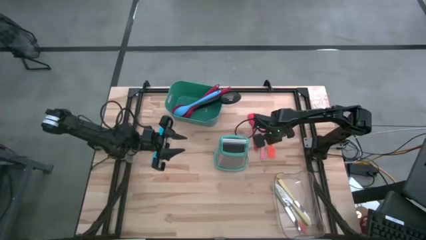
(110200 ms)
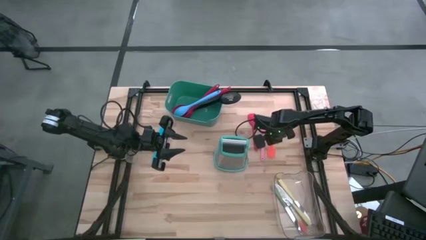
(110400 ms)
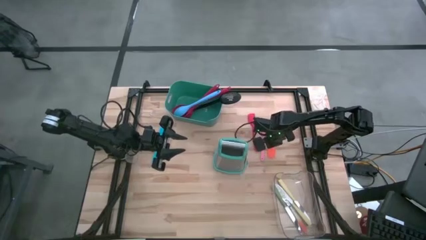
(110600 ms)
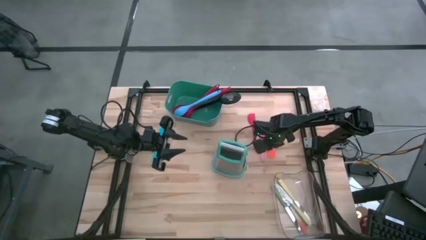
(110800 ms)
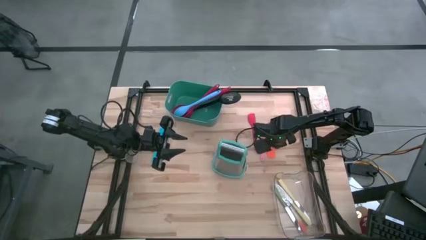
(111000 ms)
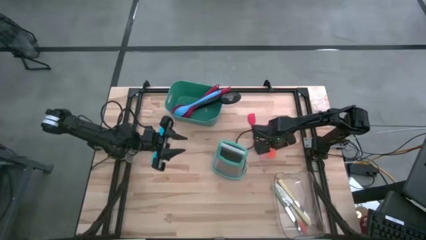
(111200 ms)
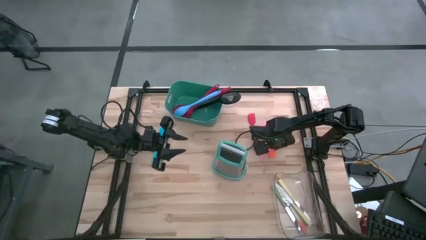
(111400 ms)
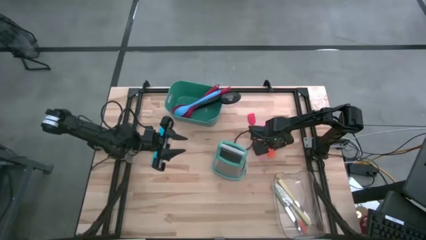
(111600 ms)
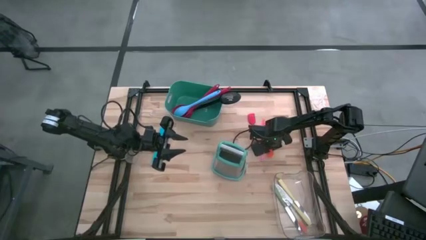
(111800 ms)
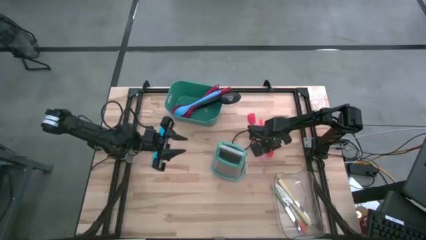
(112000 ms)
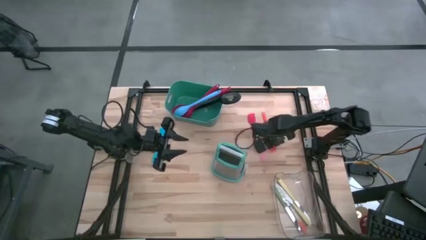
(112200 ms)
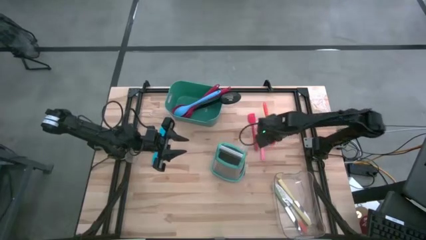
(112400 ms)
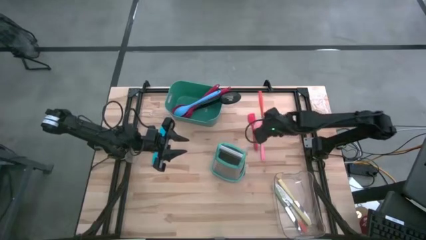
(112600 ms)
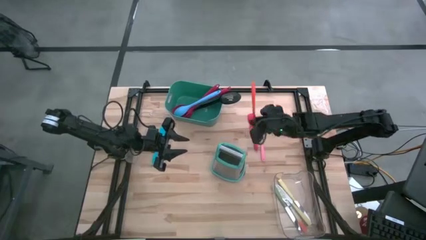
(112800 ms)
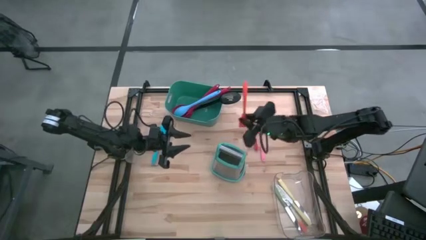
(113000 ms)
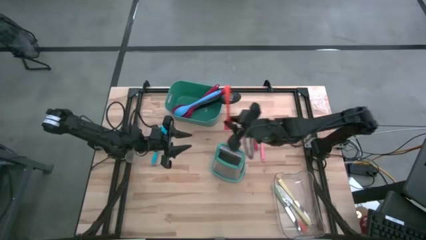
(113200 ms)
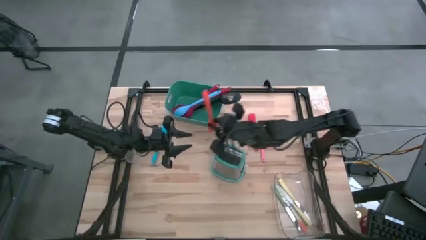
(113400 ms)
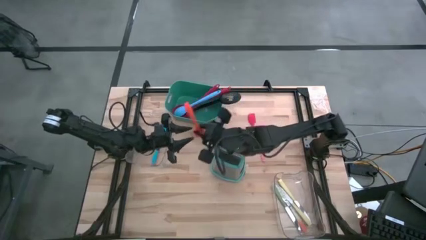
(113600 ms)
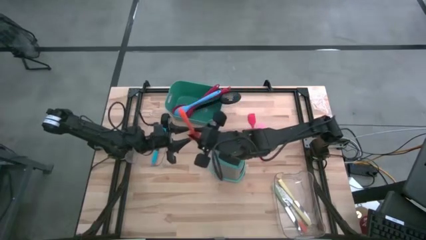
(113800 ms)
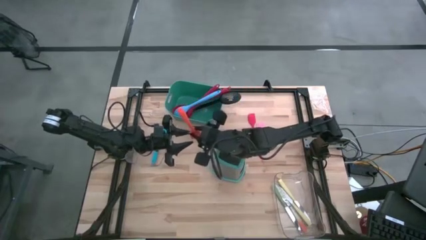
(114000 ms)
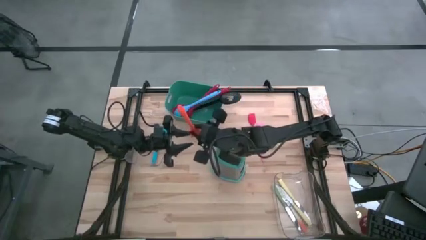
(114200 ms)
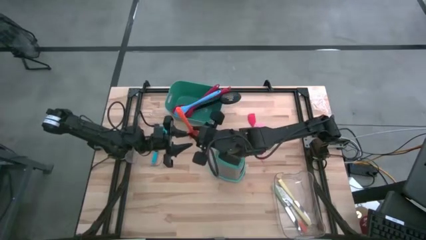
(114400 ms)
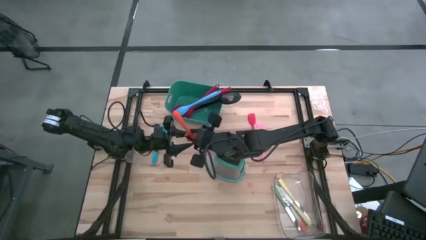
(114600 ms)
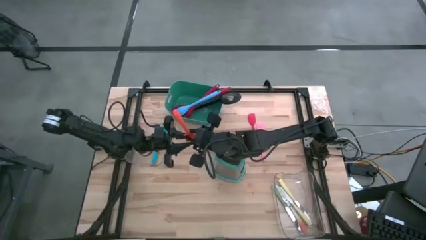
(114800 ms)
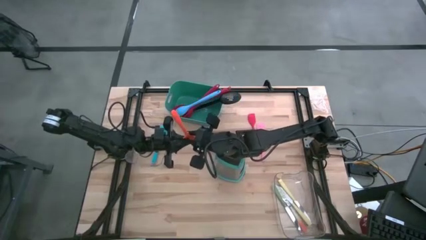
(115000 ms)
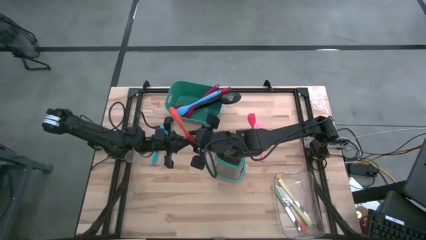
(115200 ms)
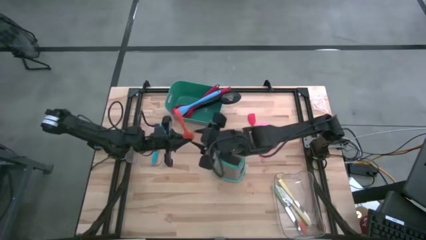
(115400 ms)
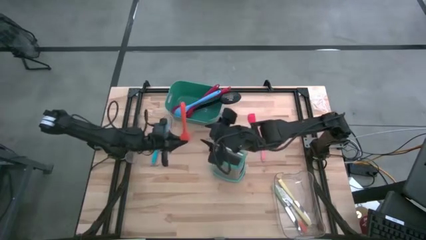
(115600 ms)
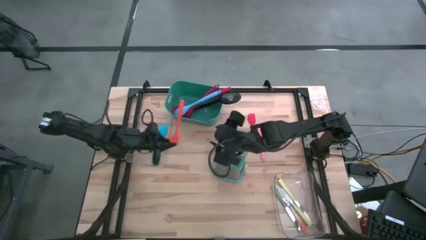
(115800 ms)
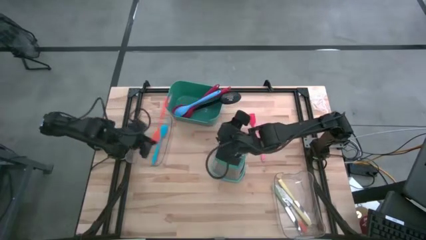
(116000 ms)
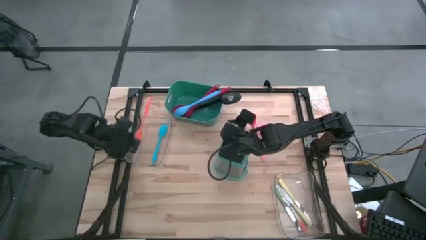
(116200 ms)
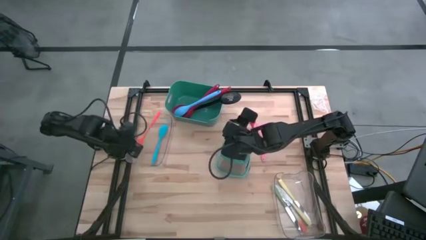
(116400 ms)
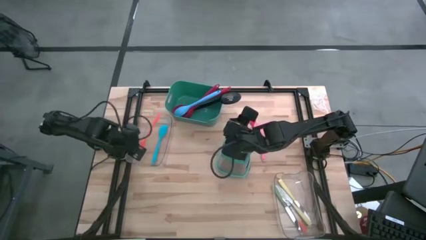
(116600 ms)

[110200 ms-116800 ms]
Task: Pick & Place Kitchen Items
Put the orange spatula into the top transparent bin

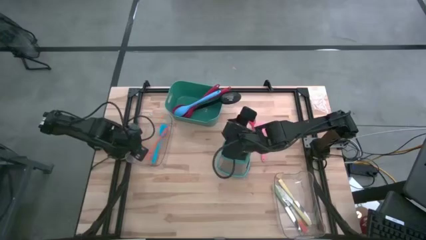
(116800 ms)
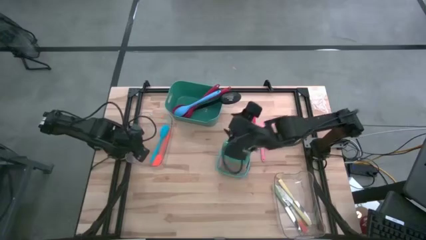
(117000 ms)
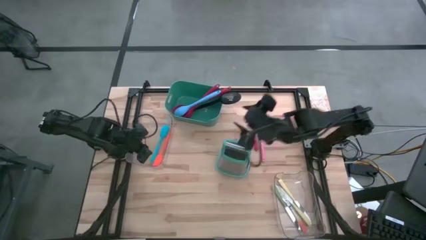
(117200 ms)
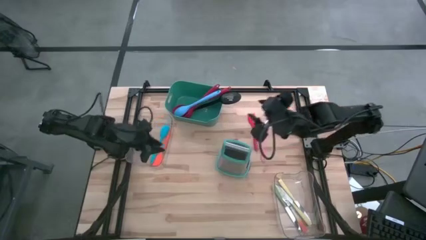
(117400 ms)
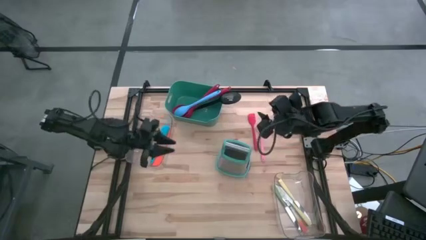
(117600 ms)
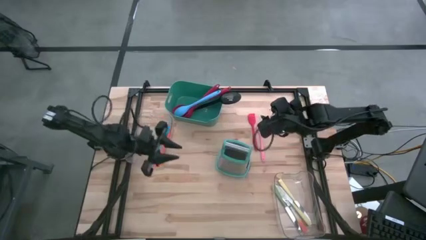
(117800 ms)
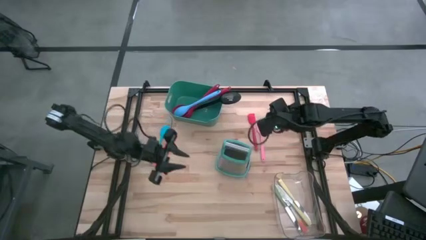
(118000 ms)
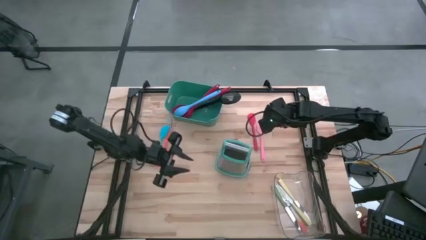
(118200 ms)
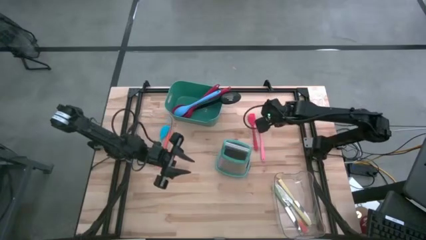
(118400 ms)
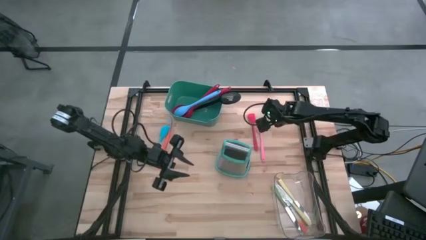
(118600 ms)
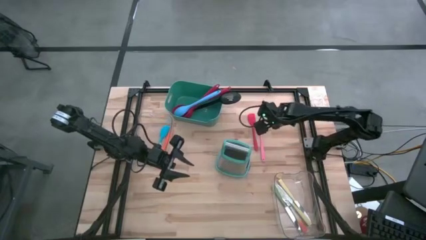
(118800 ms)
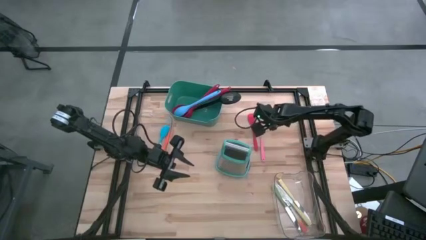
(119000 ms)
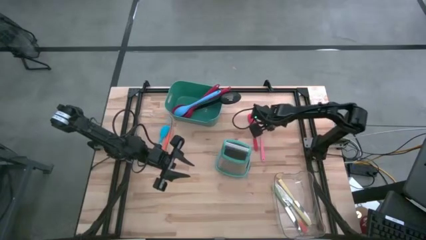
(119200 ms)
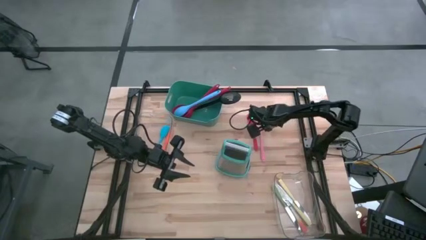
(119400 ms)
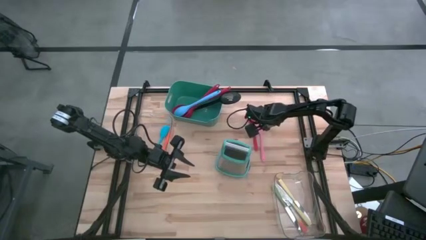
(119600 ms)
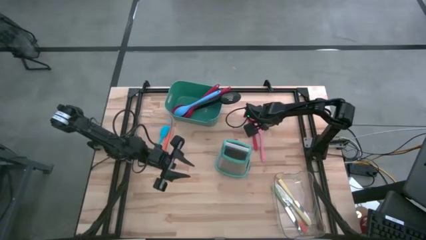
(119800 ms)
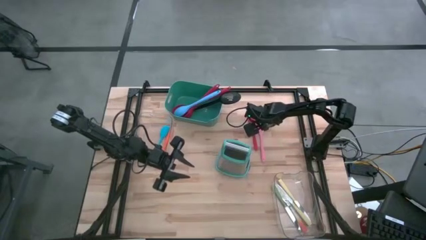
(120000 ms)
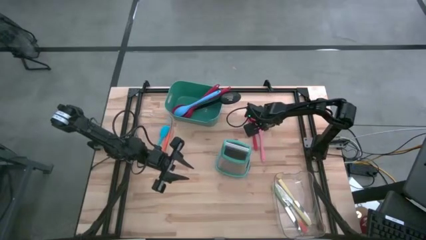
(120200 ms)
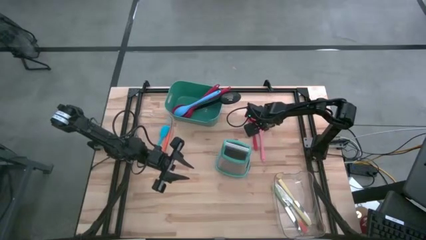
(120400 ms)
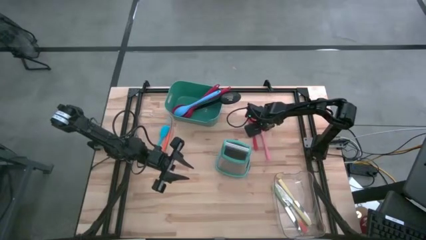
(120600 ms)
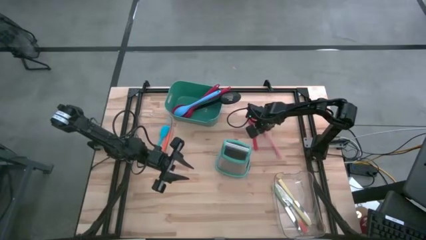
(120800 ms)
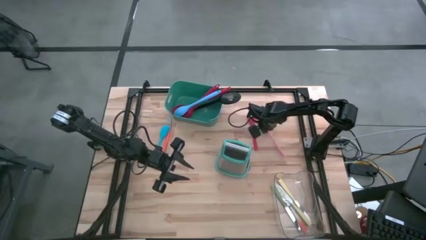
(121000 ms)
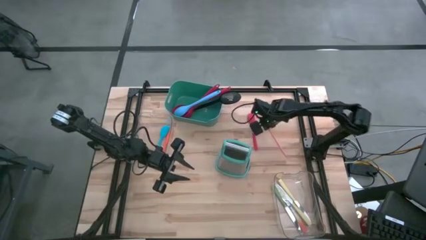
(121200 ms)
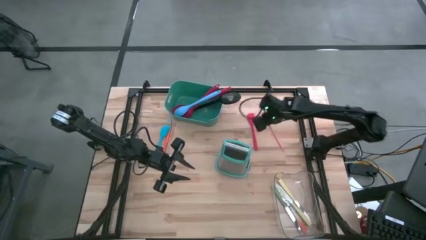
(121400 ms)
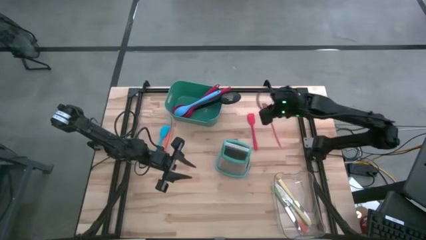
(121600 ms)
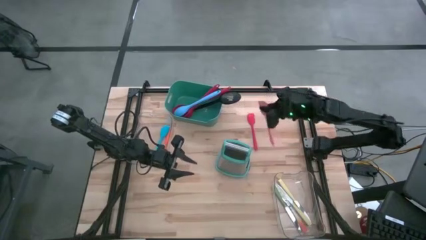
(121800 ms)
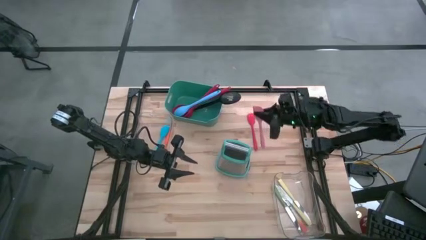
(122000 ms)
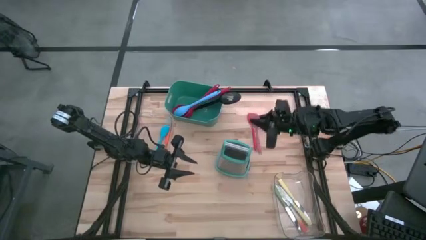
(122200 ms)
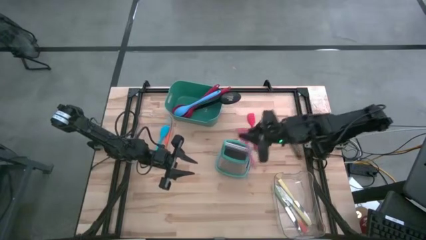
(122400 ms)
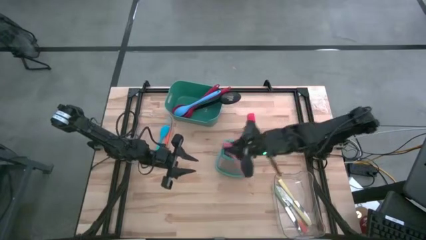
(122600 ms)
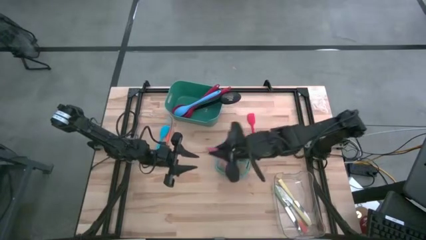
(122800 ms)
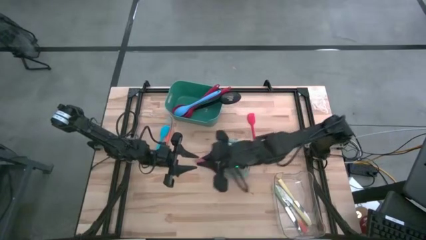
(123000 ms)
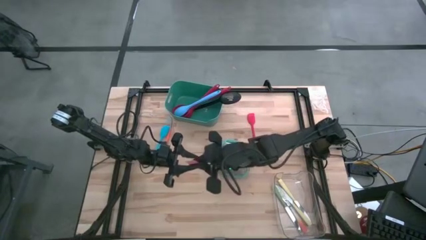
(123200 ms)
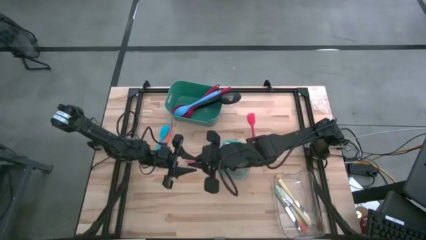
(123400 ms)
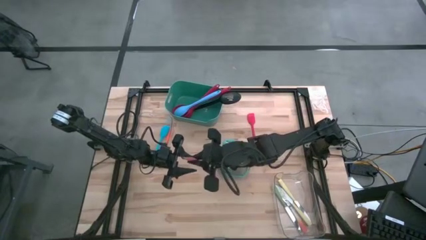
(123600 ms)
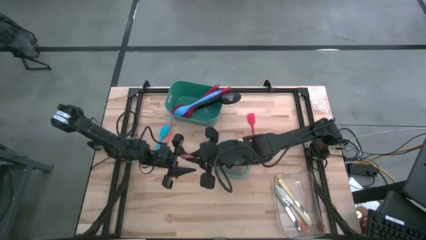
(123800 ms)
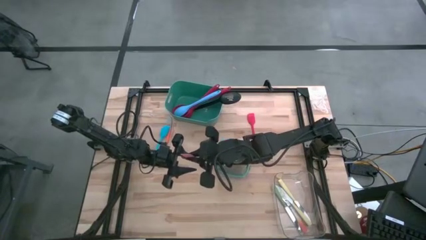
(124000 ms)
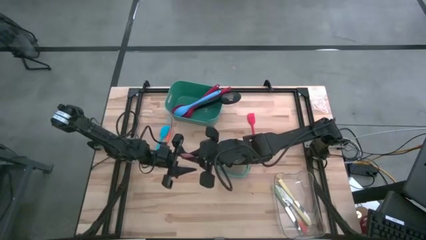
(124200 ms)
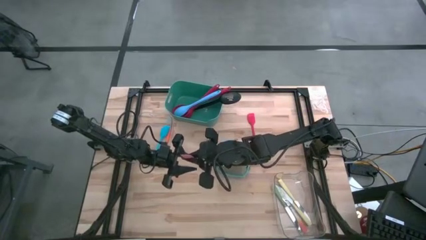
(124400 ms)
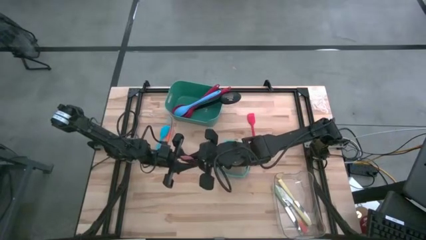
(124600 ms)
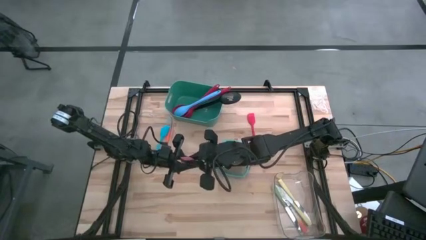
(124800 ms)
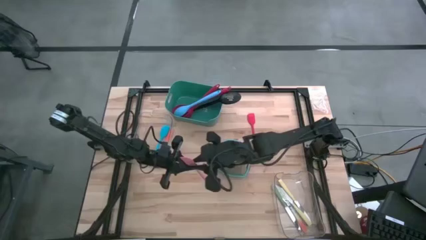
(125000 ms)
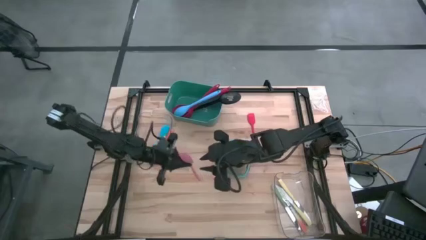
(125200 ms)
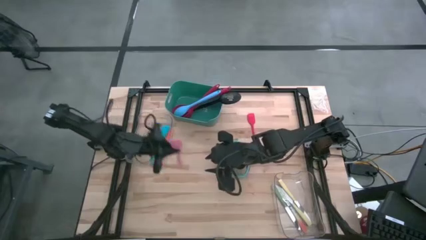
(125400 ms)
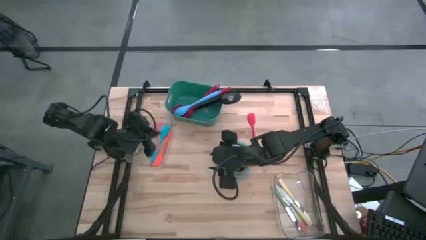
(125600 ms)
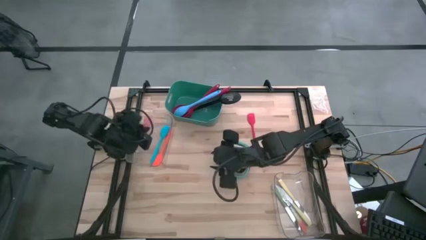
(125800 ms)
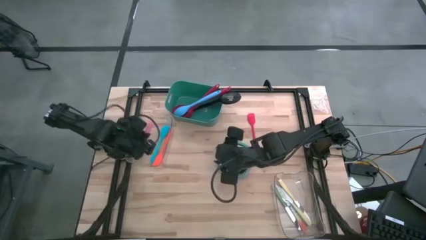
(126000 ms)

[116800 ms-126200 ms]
Put the pink spatula into the top transparent bin
